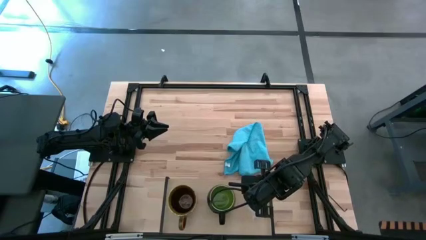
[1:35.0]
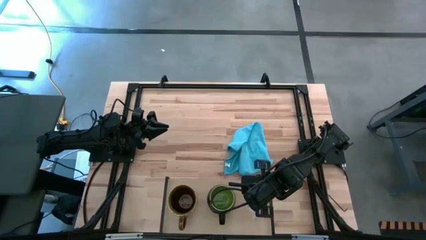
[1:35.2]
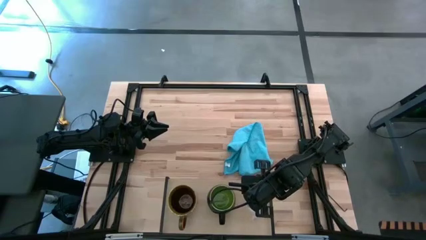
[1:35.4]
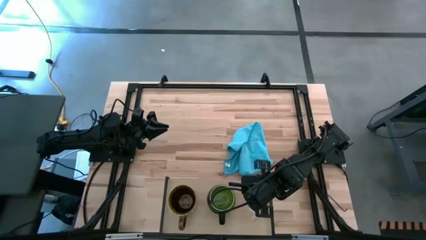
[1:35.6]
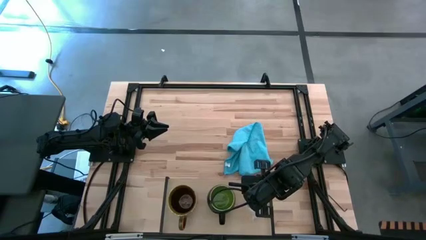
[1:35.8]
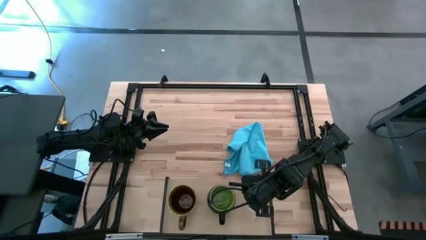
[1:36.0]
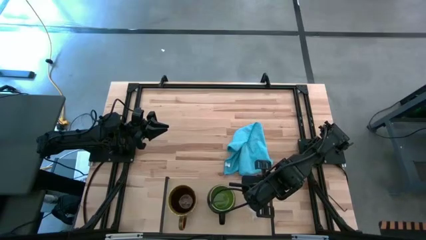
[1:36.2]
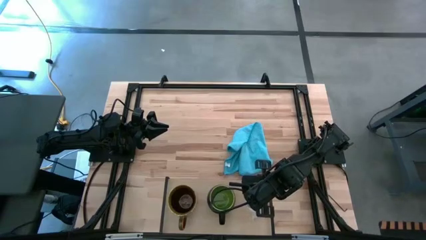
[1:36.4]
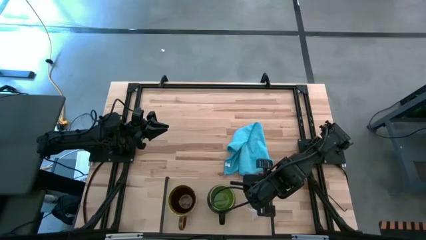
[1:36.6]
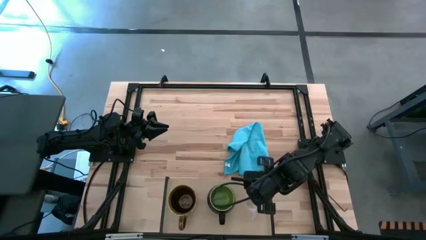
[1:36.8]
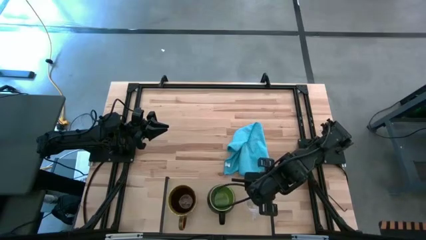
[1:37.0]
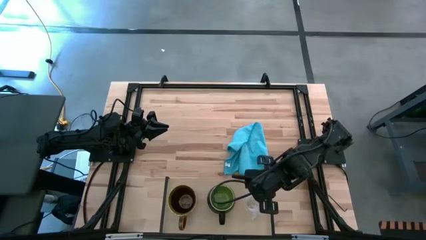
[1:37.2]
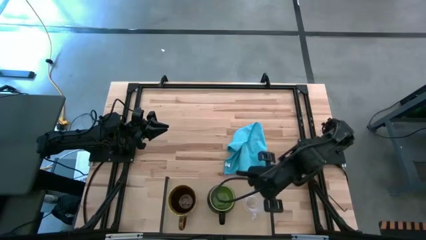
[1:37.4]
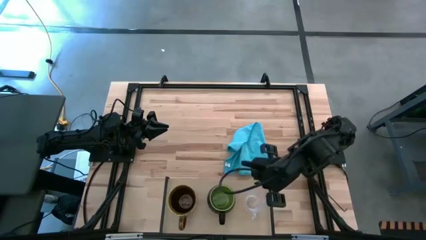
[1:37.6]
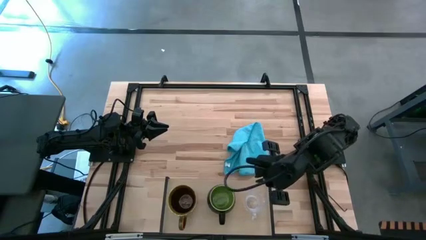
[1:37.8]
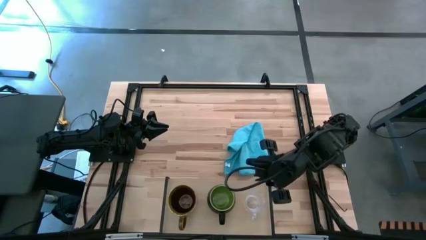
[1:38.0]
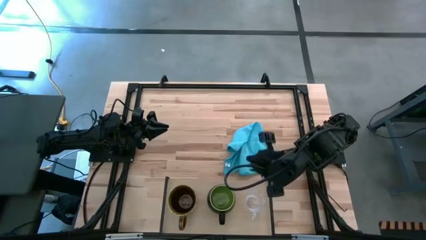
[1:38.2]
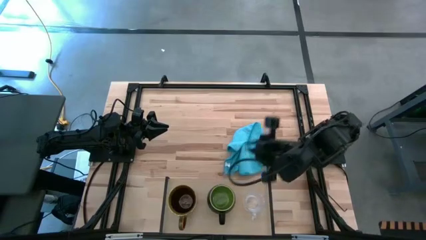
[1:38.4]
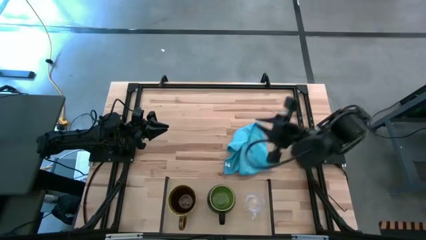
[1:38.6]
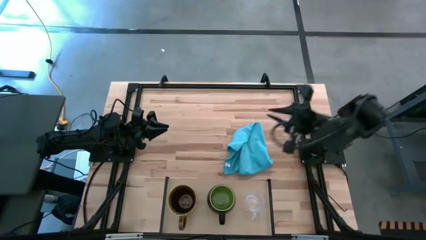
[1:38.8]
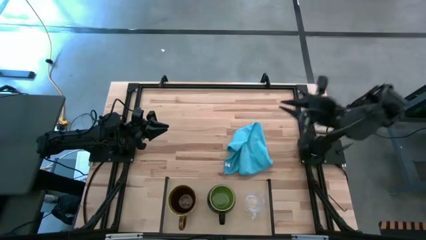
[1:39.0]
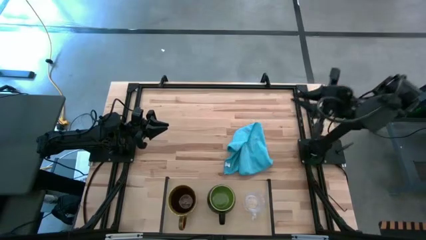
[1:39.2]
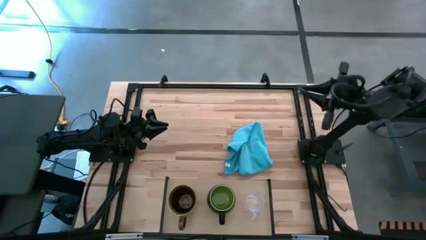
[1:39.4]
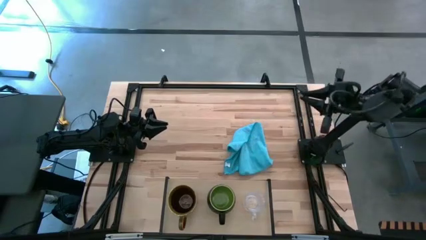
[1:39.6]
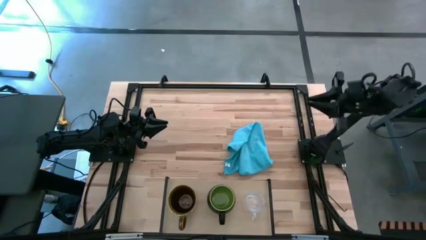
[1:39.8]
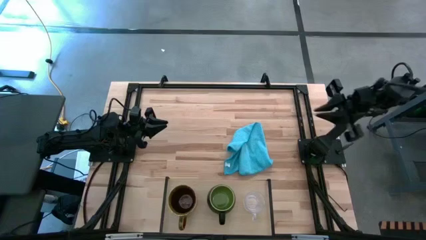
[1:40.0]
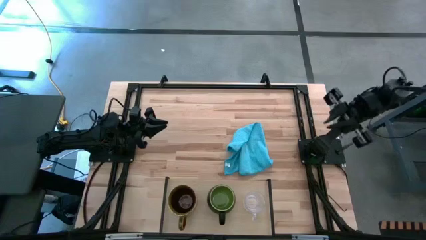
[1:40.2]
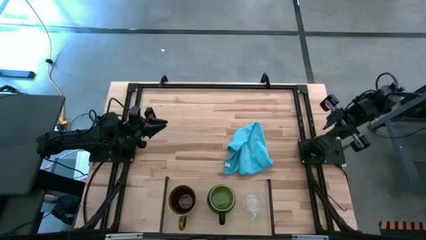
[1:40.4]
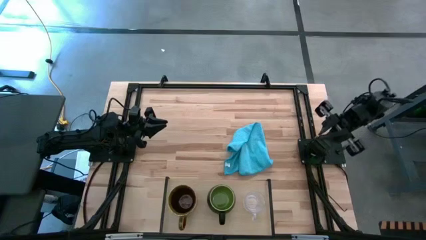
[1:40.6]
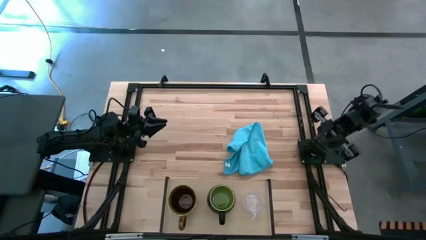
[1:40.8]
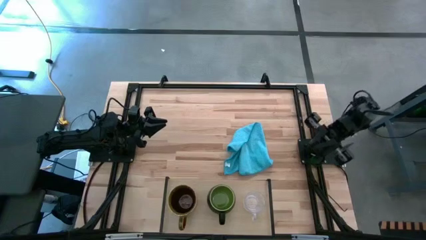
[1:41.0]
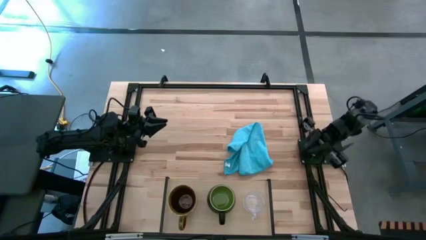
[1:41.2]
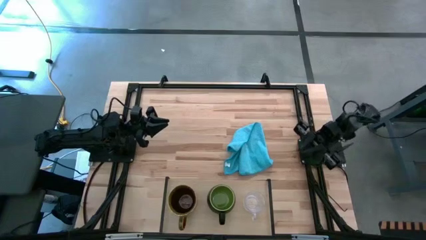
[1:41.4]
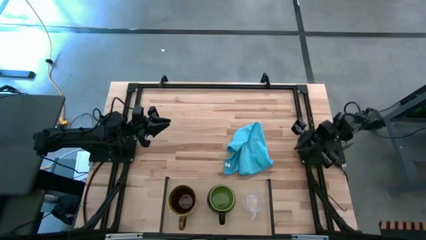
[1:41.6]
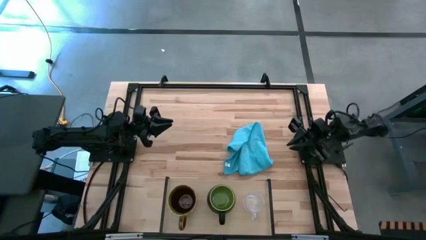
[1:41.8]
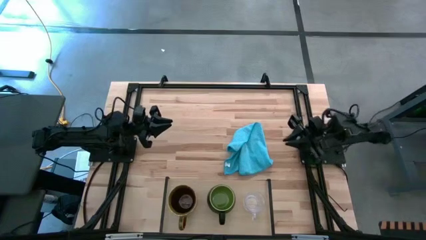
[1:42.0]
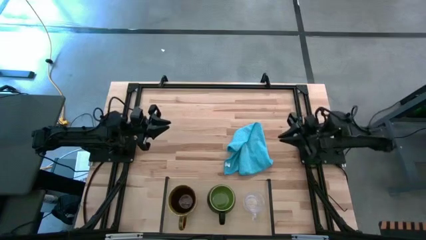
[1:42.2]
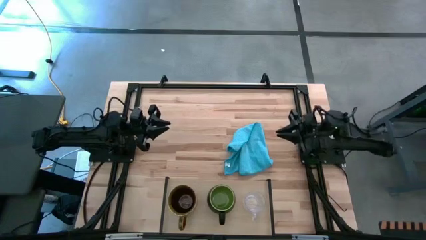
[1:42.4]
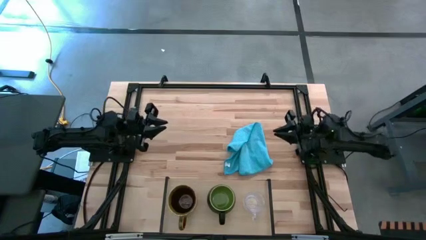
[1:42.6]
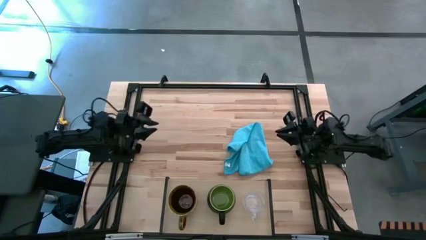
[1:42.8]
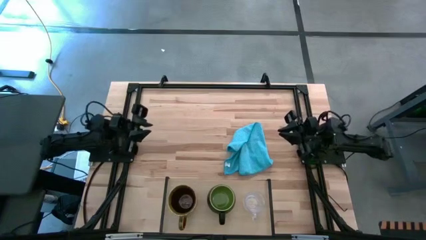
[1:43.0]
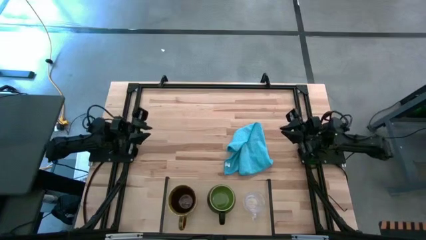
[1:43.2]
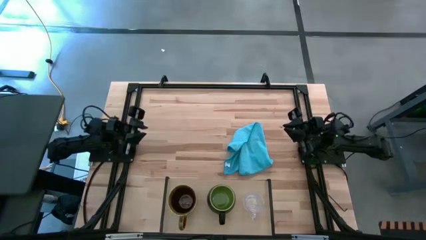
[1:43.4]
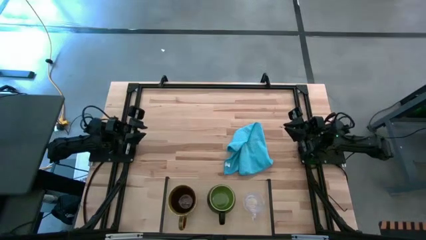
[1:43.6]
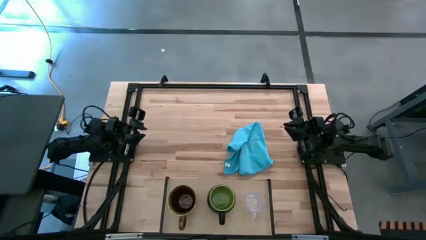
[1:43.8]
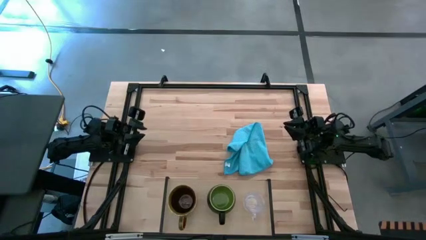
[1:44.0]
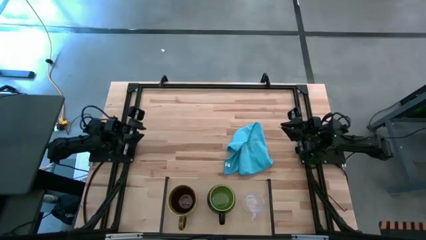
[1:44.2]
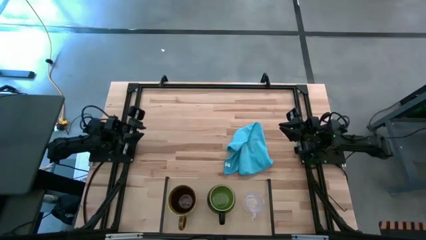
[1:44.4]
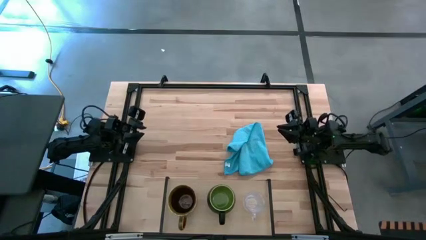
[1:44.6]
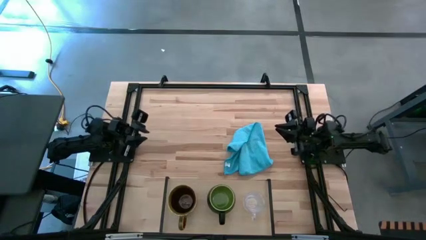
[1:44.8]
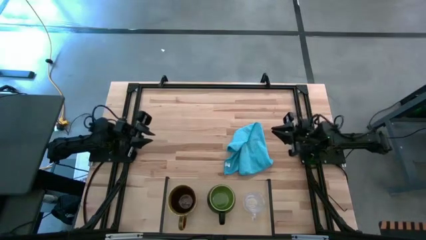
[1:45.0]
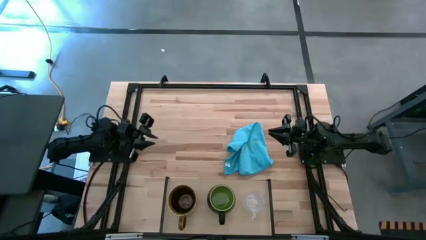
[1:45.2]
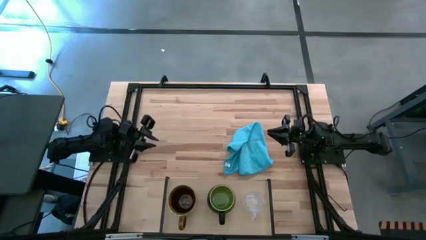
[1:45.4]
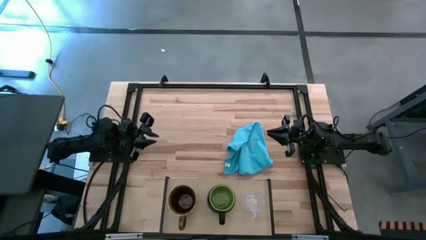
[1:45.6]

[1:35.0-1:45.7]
Task: Stack small to large cups/mugs on shelf
Return to Home Position

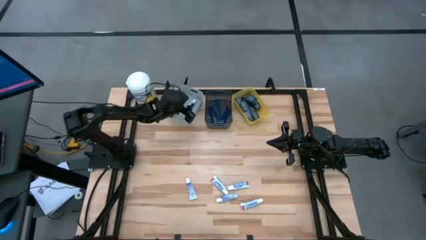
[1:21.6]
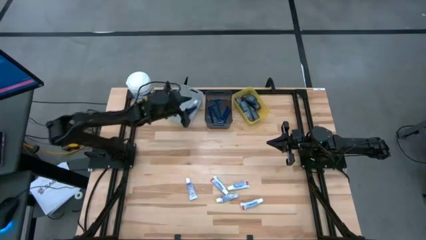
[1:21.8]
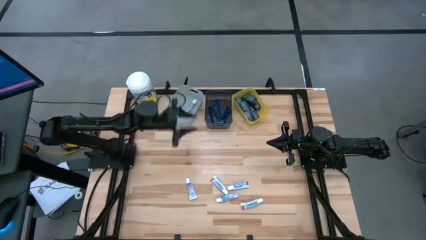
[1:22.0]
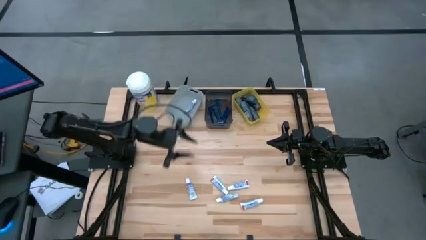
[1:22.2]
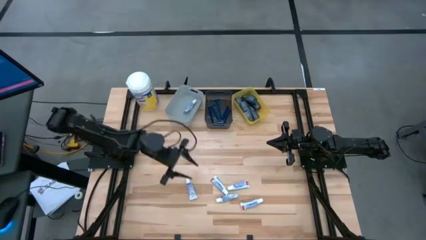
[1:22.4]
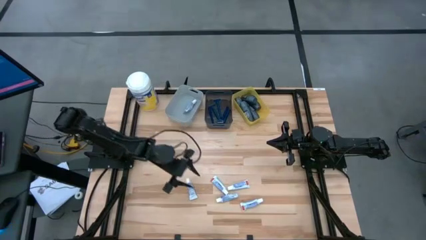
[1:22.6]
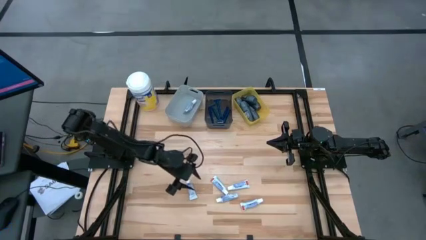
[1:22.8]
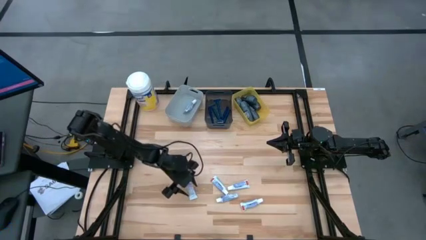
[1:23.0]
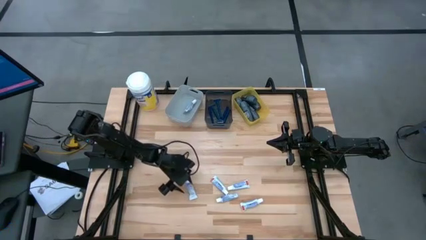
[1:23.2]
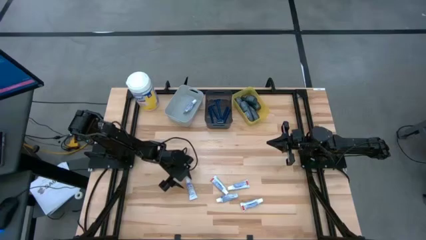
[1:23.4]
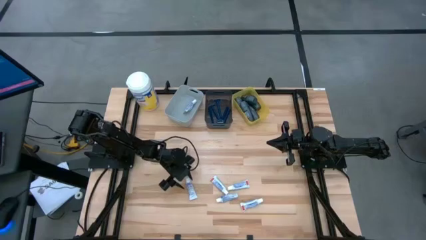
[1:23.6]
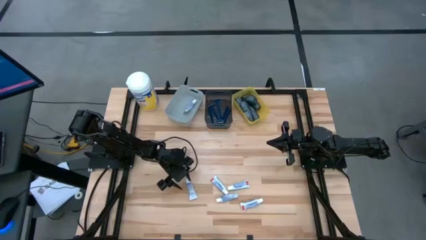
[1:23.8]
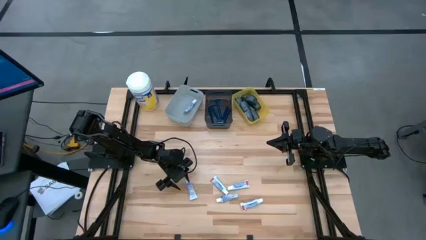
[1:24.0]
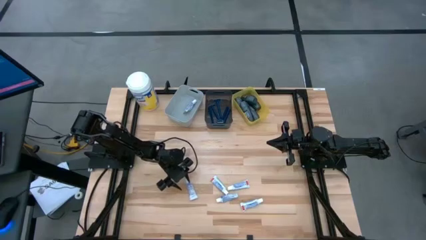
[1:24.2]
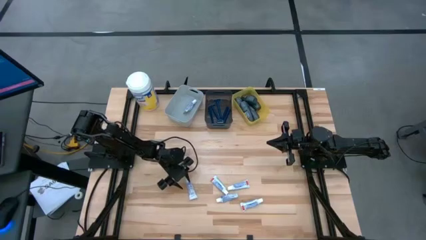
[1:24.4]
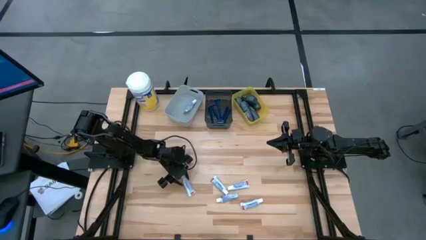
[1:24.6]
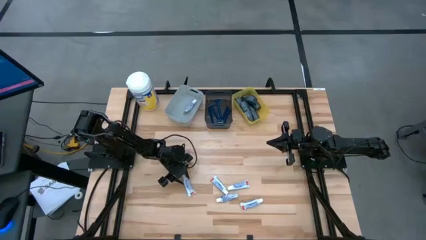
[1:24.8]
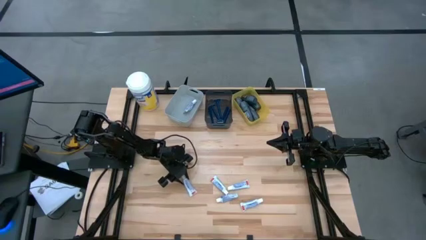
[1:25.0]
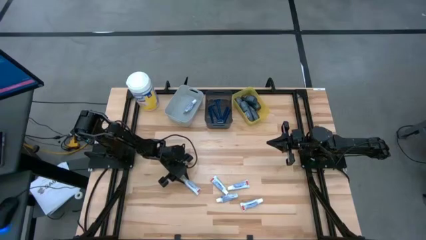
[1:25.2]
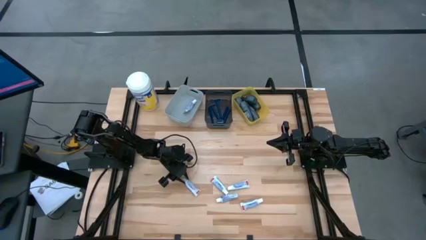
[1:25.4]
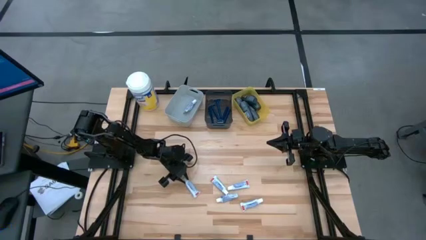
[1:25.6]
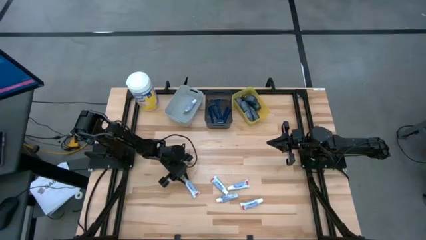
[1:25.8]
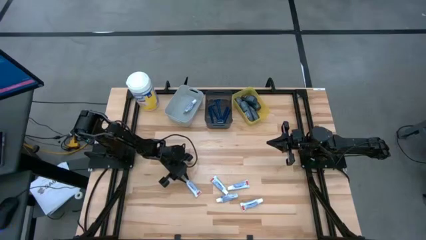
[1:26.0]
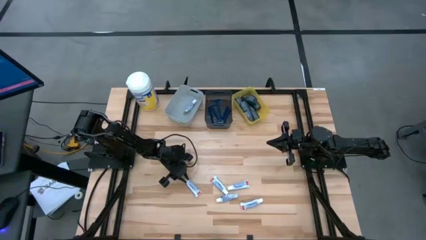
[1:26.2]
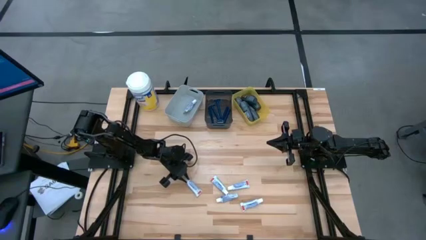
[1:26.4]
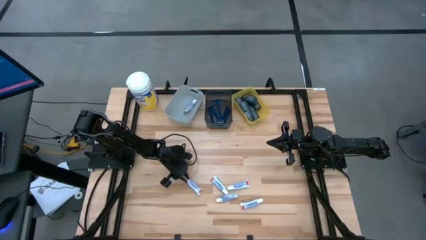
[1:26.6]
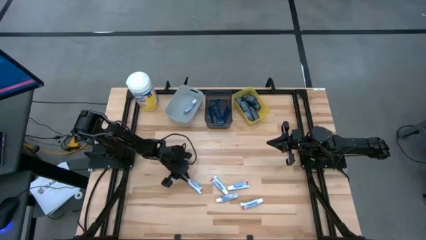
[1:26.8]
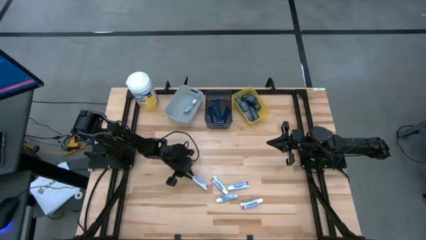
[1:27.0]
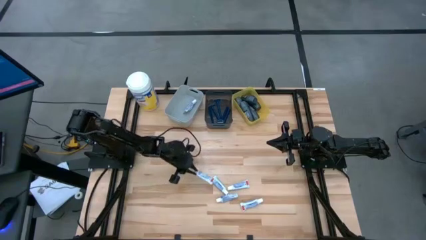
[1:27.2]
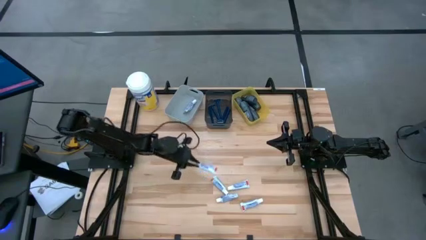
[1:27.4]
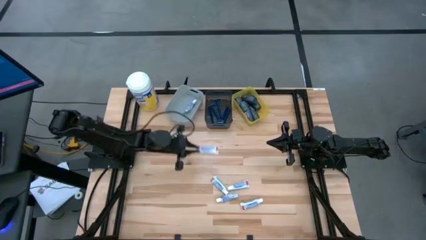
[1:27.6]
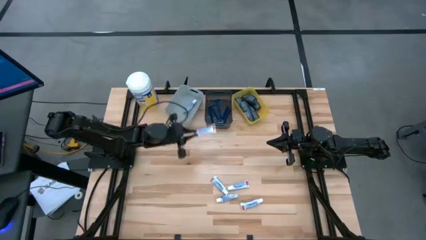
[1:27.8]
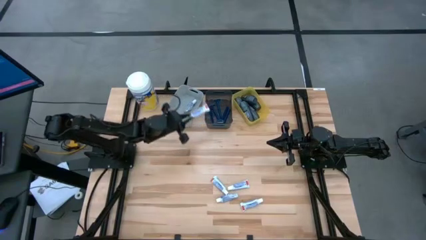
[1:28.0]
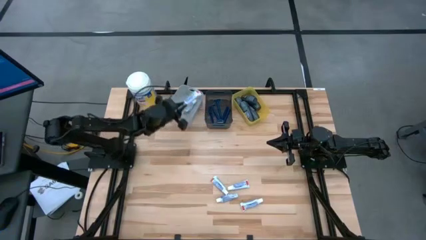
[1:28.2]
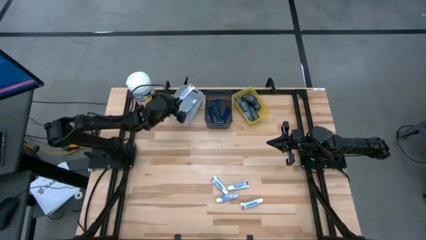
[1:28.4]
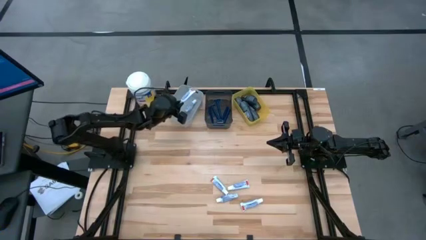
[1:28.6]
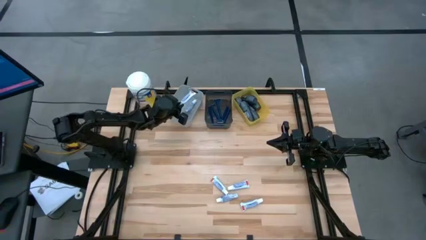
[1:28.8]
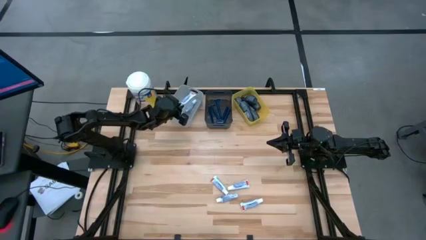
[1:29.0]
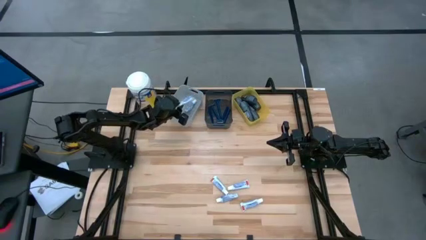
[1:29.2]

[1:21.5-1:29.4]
Task: Pick & Place Travel size toiletries
Put the toothpaste into the gray bin
